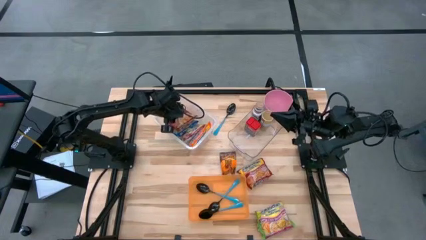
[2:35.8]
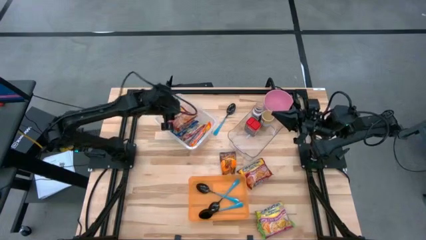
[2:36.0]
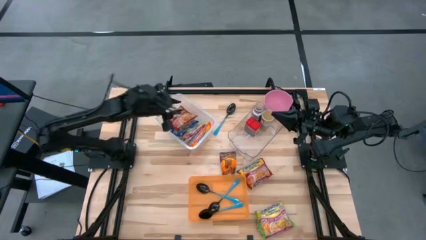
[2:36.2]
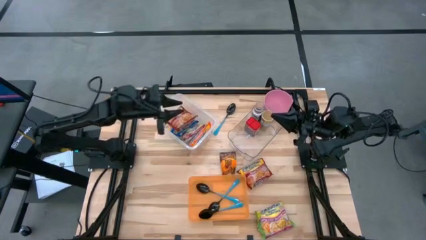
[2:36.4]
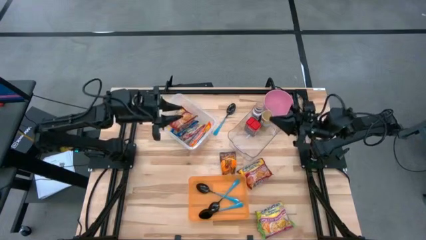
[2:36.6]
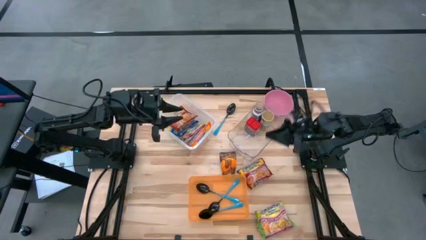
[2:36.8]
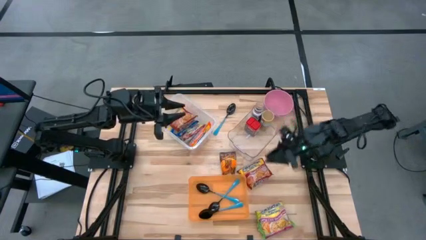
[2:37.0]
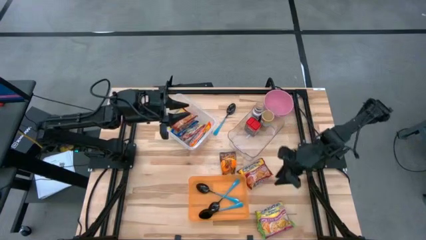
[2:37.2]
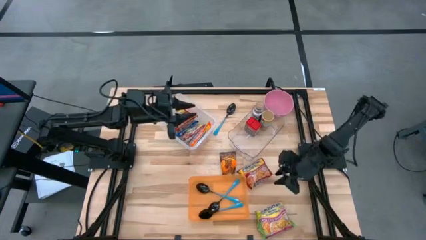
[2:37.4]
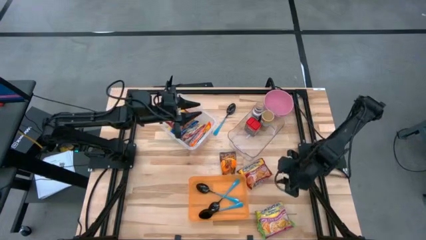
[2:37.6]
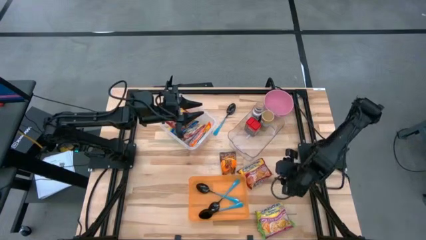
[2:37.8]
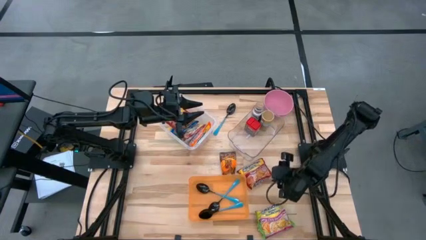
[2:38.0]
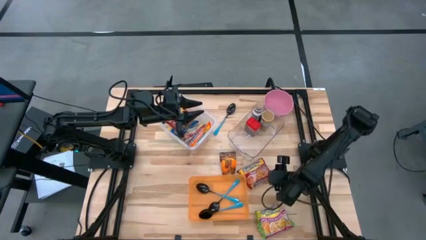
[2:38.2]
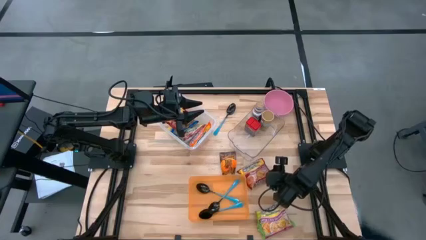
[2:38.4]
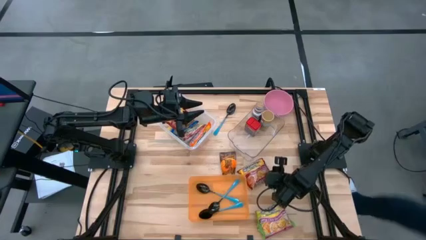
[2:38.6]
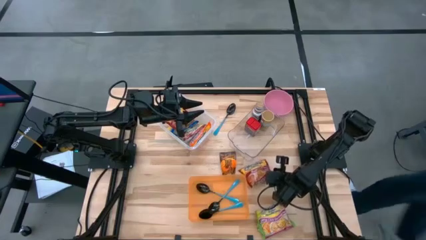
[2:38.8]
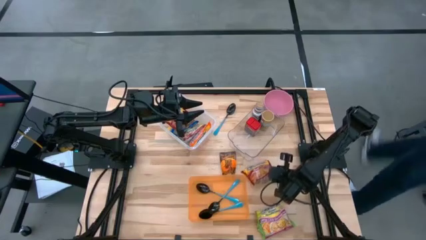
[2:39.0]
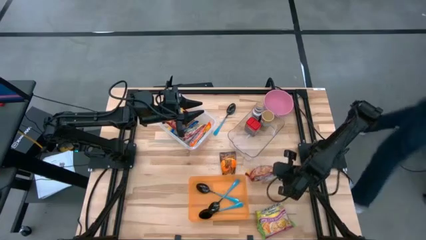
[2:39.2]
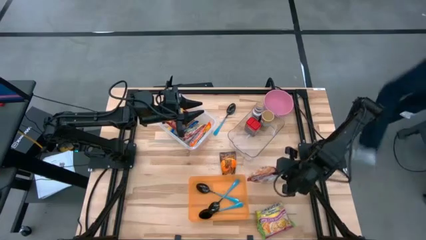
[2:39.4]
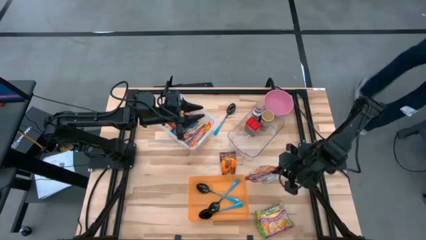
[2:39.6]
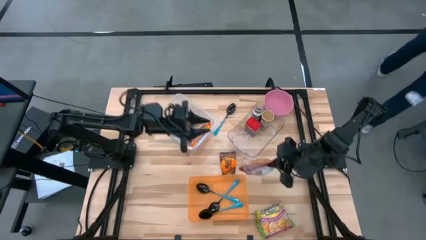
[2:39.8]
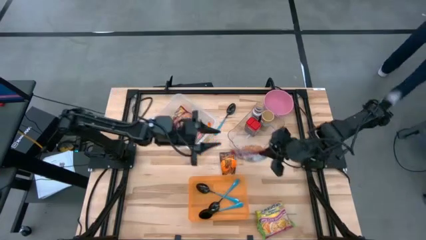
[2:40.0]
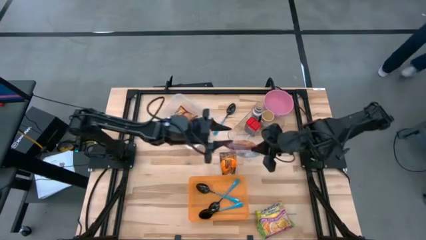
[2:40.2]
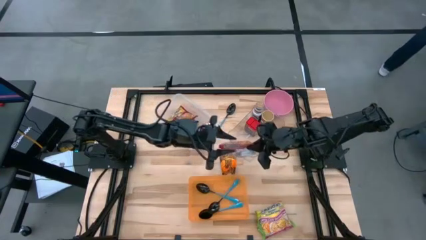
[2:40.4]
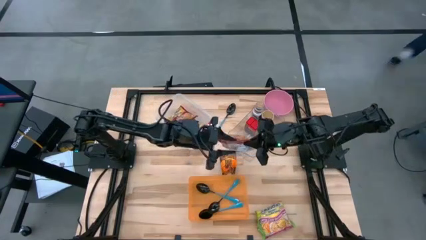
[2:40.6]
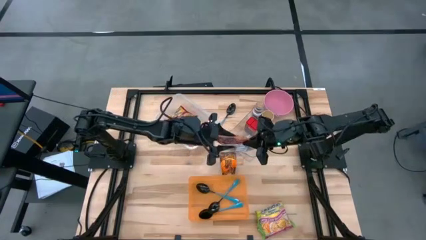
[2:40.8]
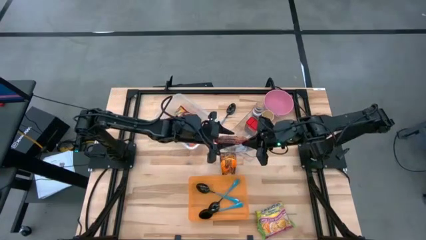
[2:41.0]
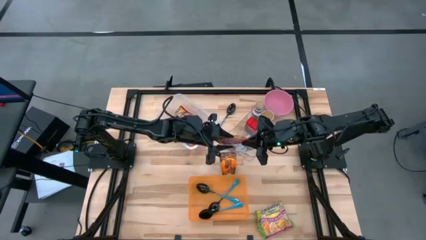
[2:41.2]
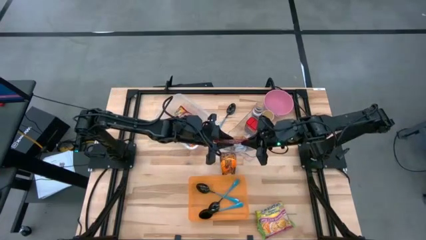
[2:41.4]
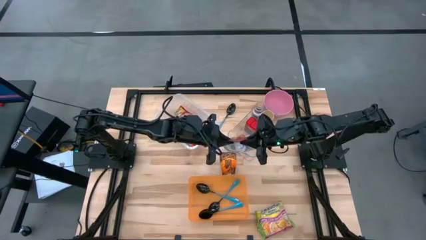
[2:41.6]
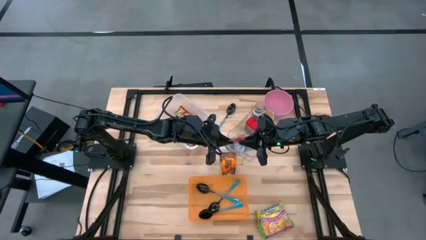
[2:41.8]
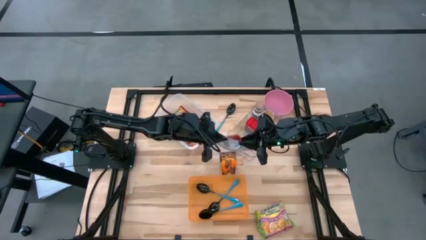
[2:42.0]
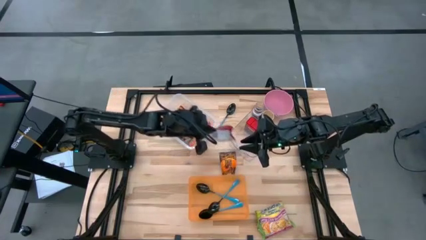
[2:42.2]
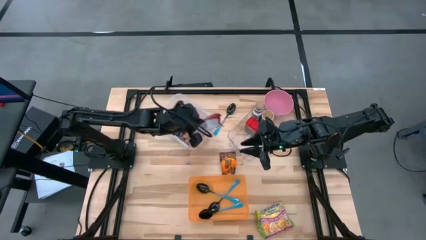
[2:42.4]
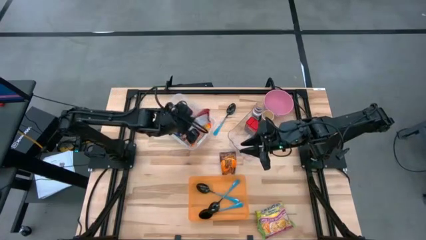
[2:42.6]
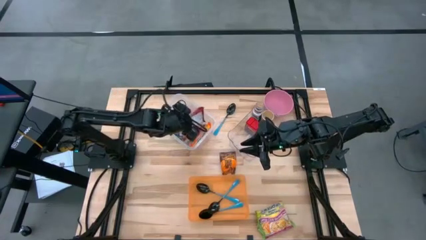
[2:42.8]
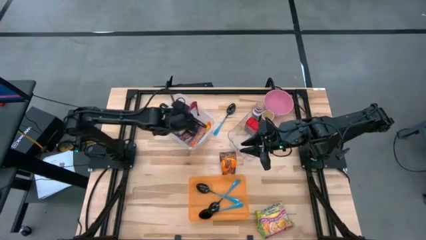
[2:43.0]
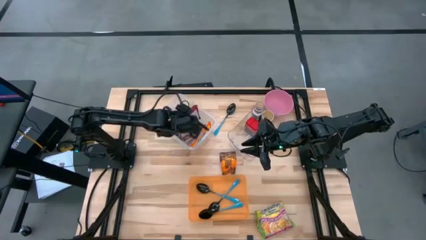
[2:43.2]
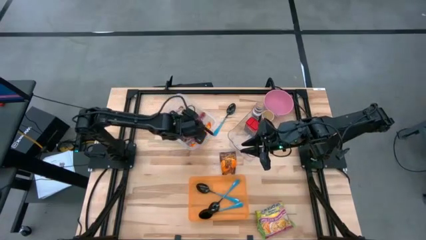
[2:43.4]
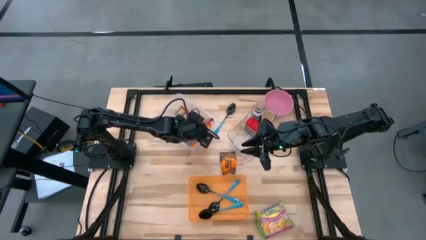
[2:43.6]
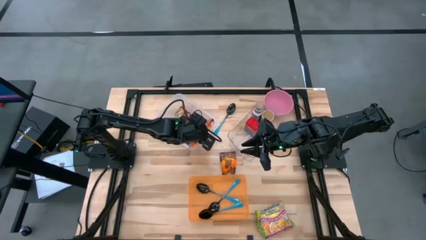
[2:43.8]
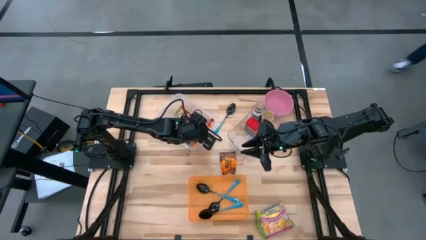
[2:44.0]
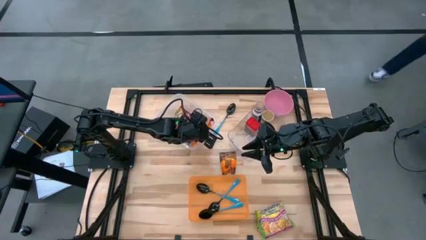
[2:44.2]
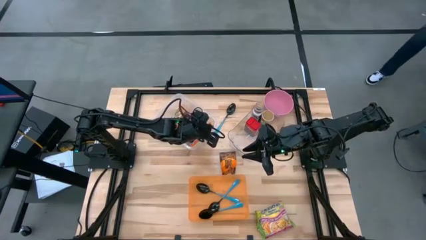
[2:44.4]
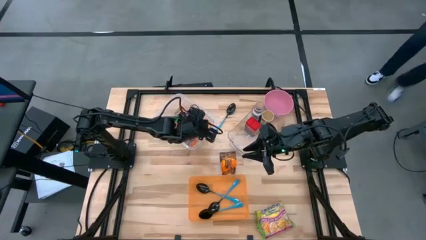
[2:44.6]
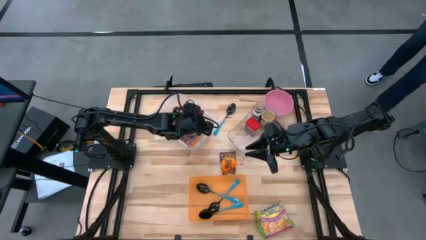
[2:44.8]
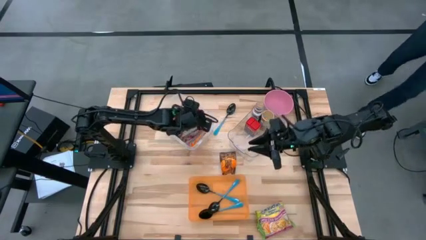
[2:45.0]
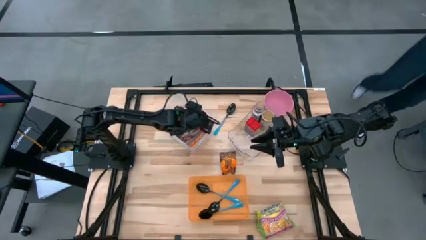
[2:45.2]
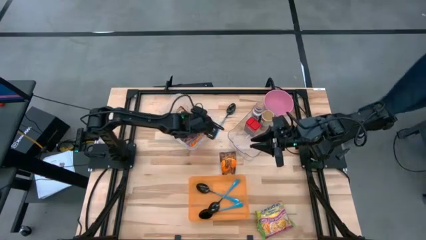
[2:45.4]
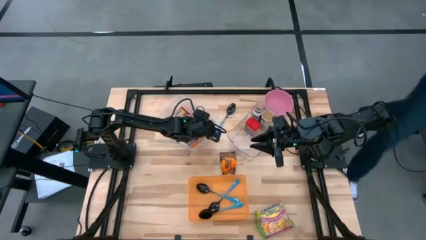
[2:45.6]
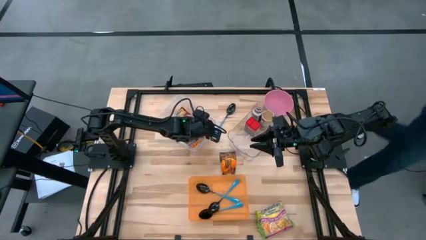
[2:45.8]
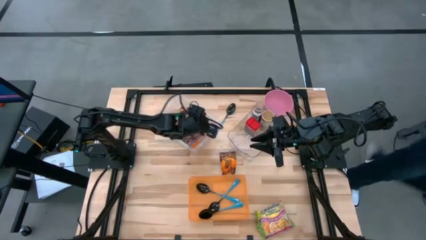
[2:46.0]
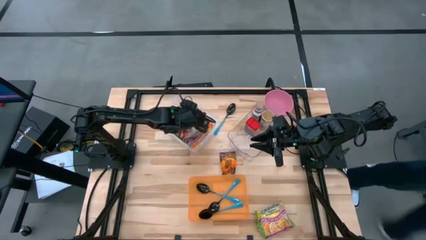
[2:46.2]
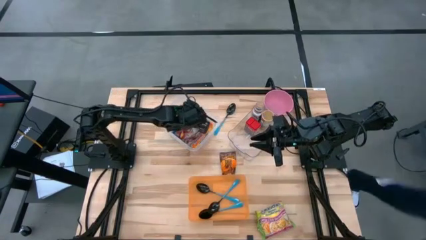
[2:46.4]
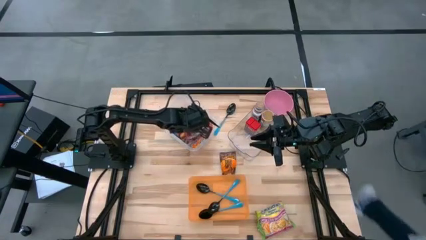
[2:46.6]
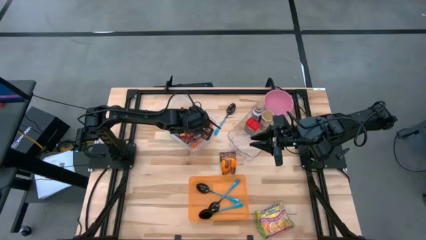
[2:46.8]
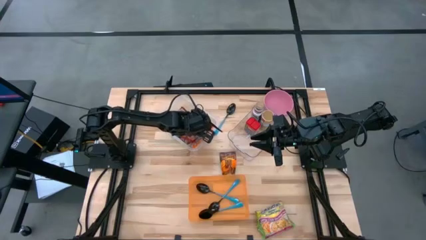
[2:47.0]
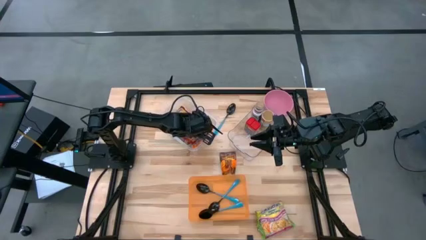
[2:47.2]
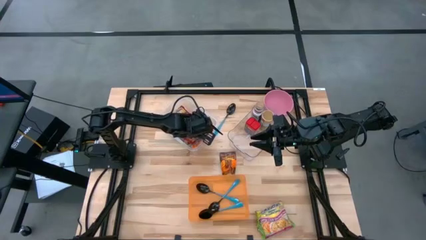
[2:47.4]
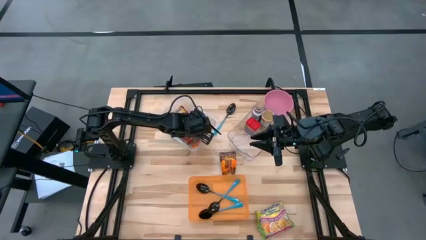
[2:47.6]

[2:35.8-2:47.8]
Task: Pick & Place Food Item
Put the red noodle pack into the transparent container

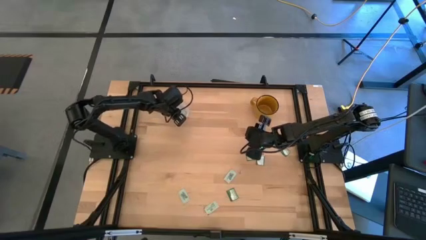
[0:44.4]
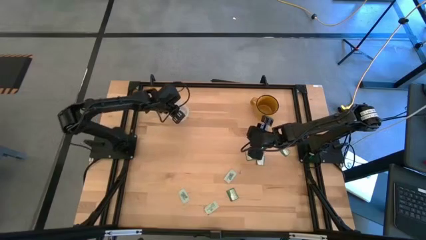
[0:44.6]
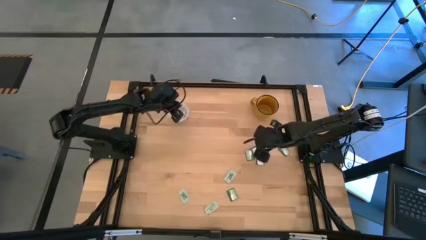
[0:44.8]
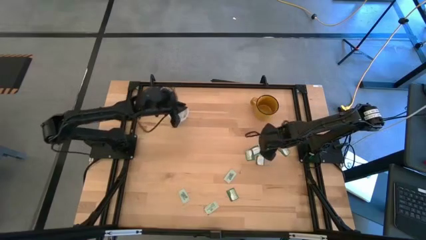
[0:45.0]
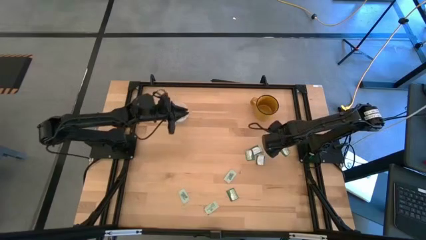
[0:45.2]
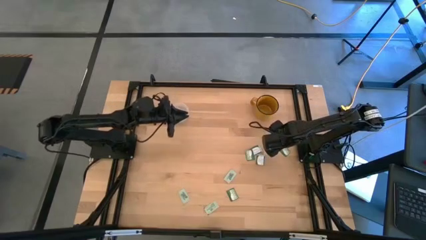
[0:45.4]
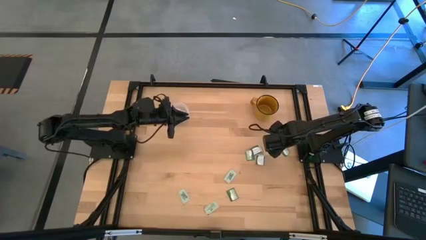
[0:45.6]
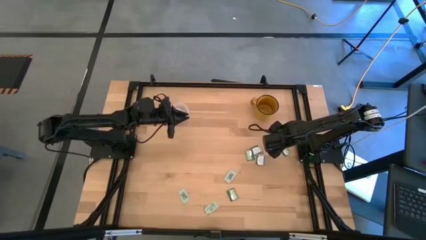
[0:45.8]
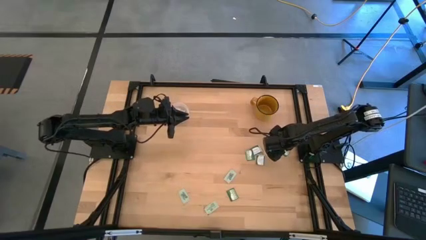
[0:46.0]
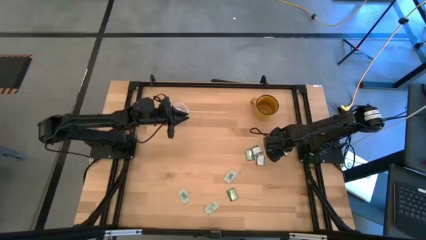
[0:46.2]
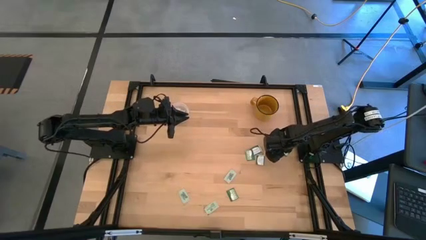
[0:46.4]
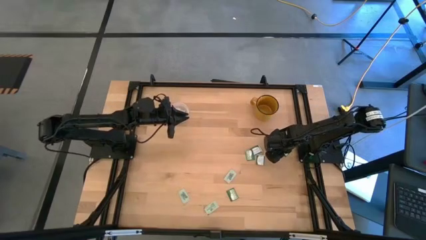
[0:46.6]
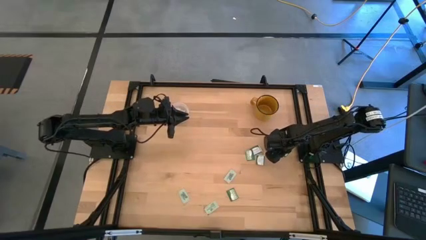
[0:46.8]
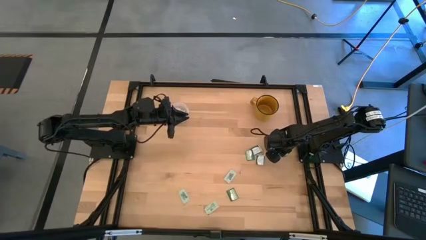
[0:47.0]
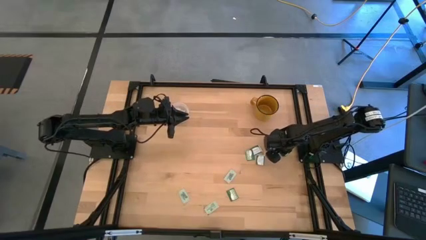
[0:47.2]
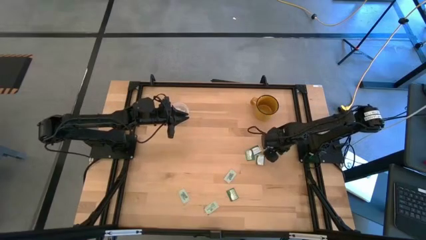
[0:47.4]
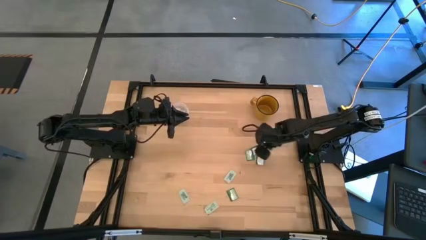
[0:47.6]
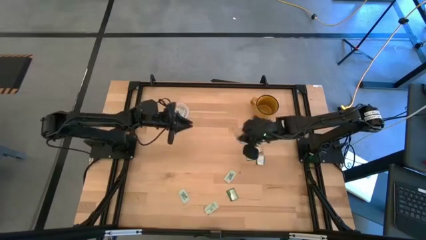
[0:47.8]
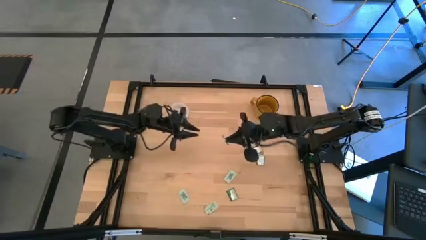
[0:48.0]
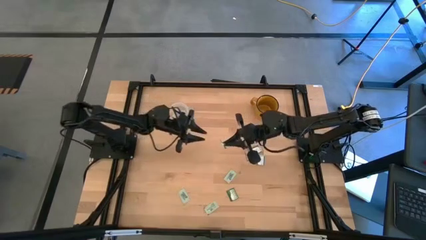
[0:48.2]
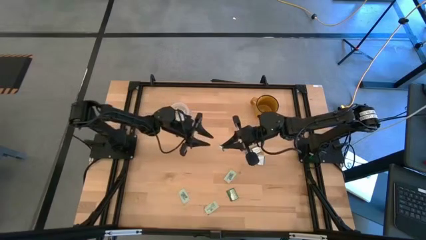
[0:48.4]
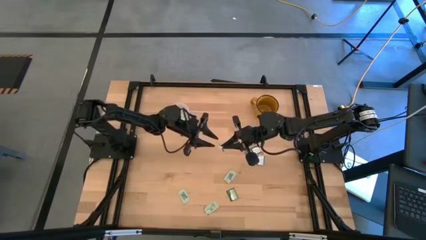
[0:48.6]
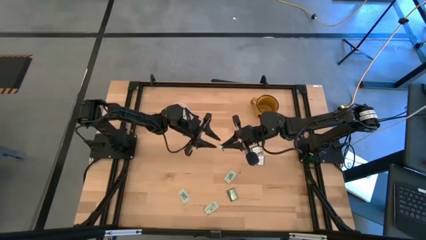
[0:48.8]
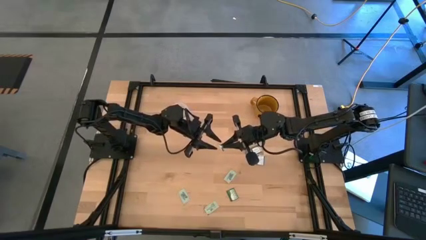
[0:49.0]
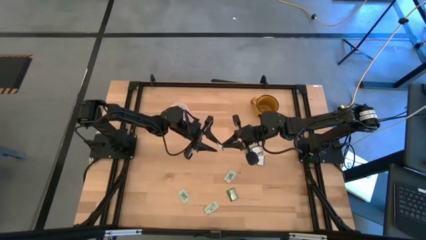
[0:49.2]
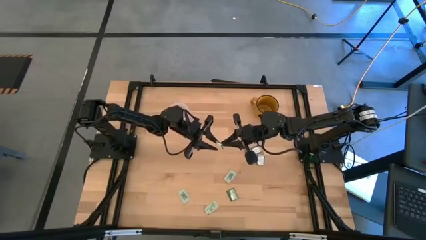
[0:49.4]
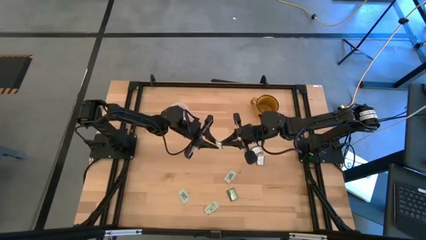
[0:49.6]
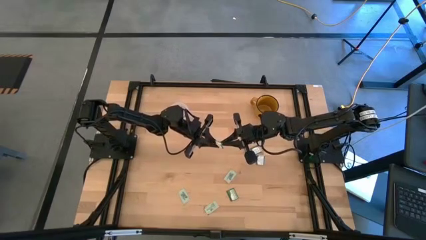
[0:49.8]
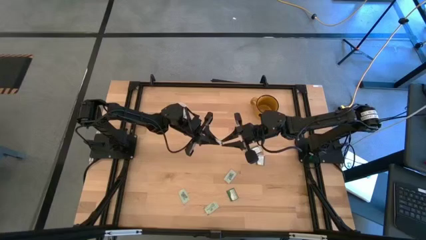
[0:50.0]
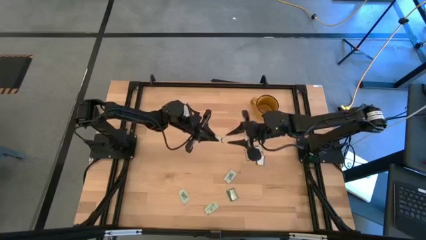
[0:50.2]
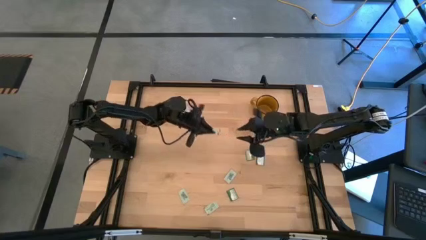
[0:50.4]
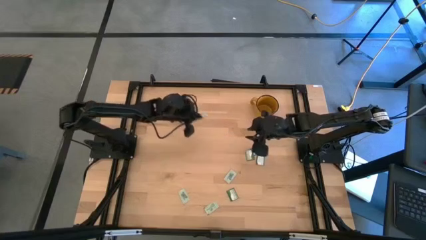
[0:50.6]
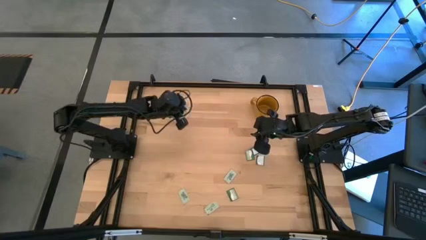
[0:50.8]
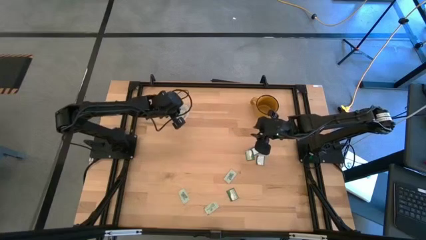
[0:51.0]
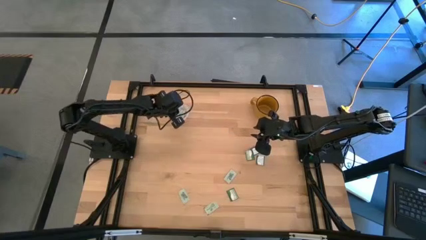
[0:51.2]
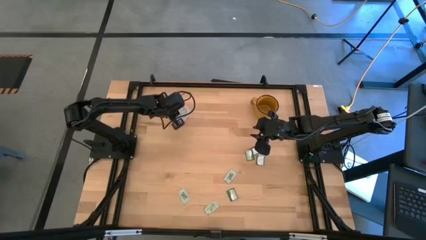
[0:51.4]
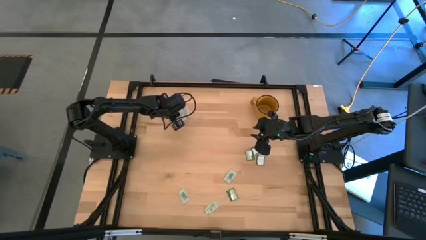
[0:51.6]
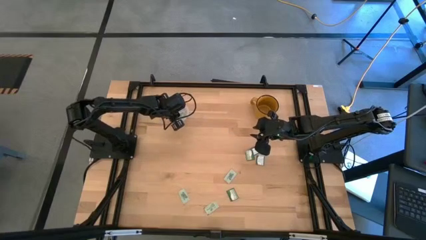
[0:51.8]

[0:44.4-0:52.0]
Task: Pick and place Stevia / Truvia into bins
Put the truvia packet into the transparent container
